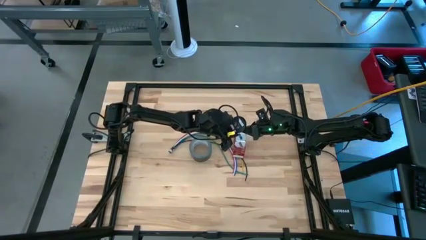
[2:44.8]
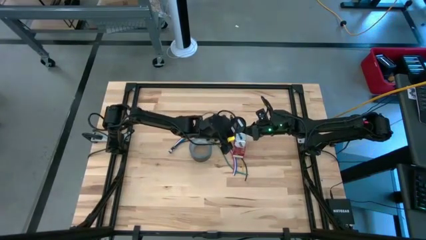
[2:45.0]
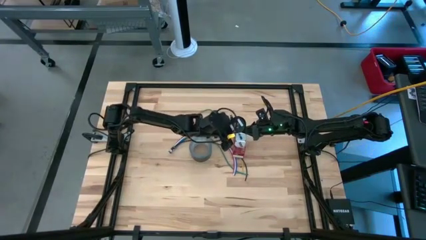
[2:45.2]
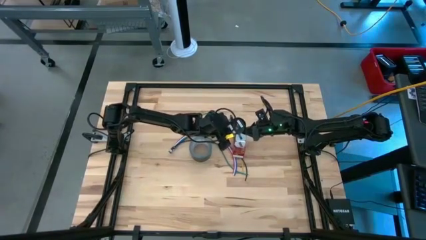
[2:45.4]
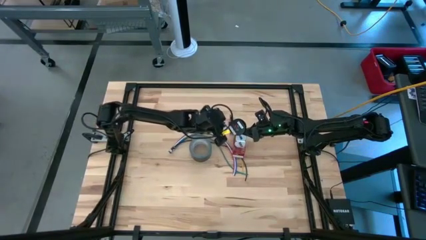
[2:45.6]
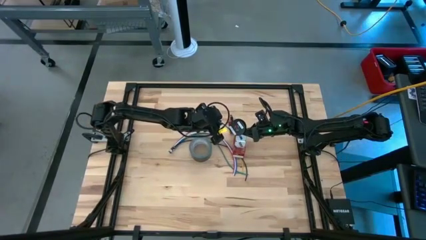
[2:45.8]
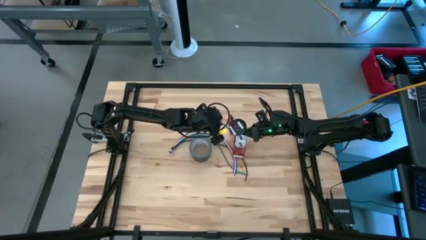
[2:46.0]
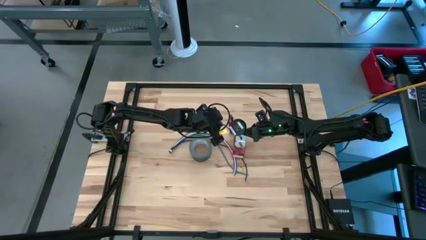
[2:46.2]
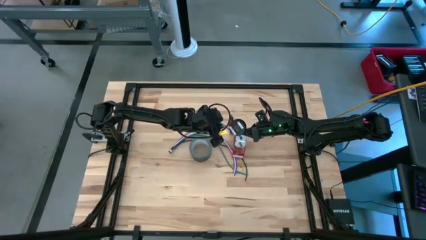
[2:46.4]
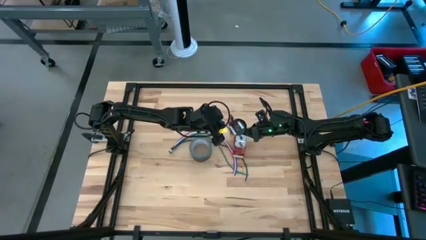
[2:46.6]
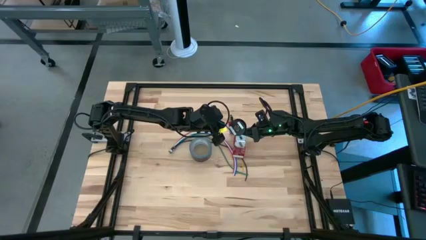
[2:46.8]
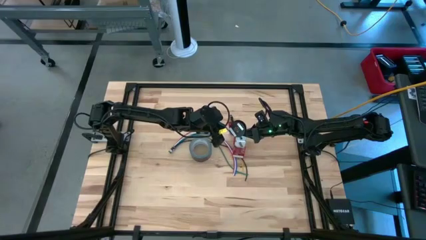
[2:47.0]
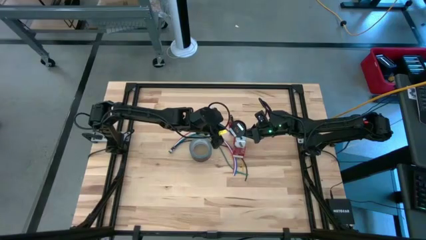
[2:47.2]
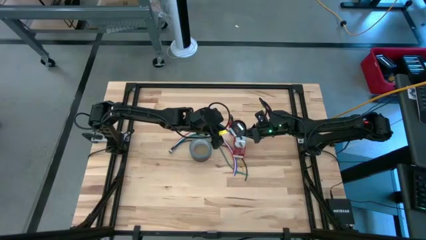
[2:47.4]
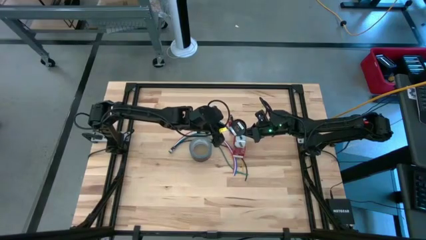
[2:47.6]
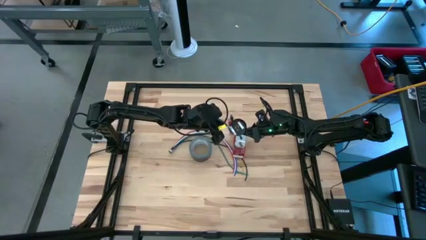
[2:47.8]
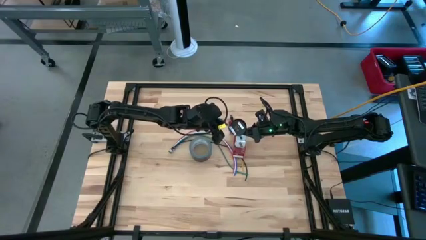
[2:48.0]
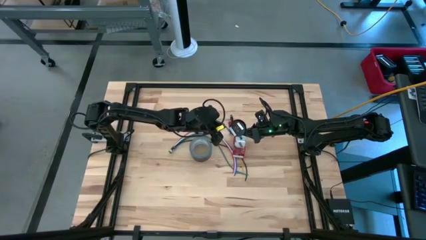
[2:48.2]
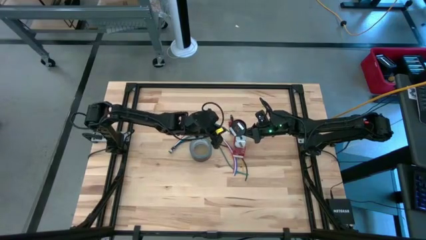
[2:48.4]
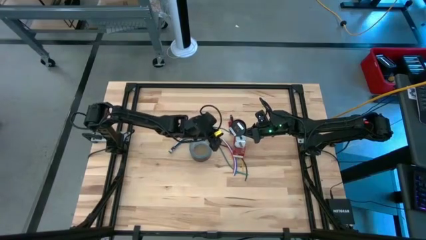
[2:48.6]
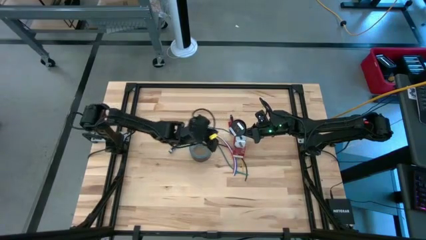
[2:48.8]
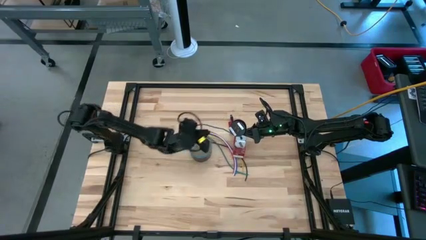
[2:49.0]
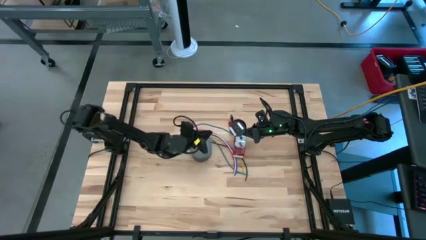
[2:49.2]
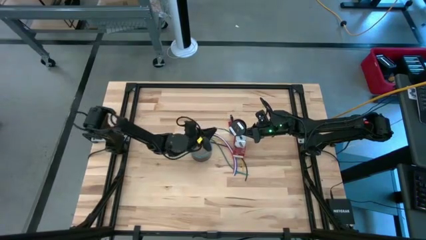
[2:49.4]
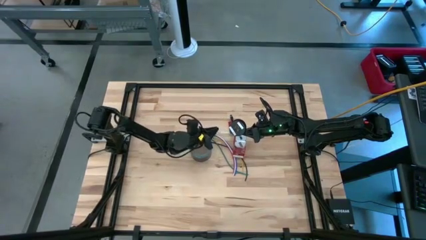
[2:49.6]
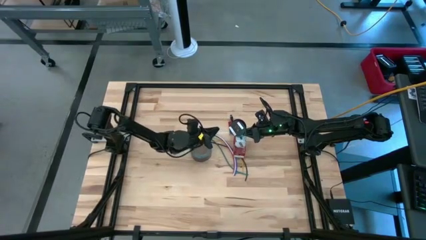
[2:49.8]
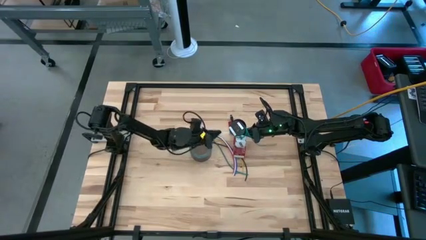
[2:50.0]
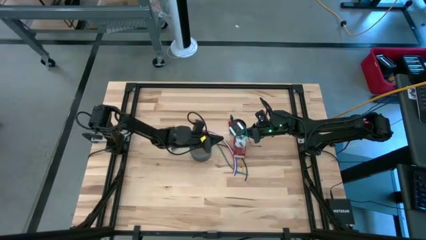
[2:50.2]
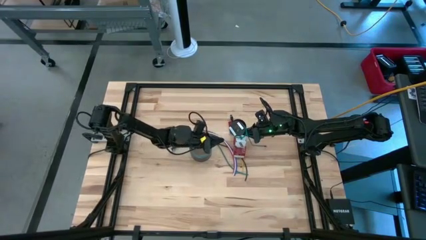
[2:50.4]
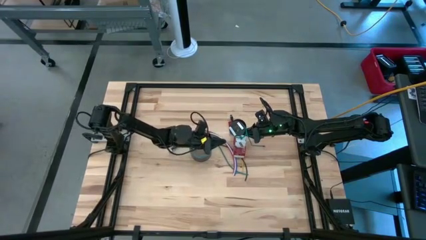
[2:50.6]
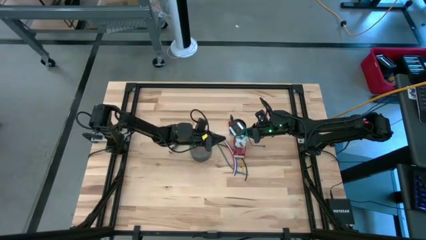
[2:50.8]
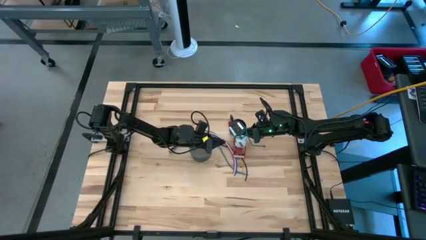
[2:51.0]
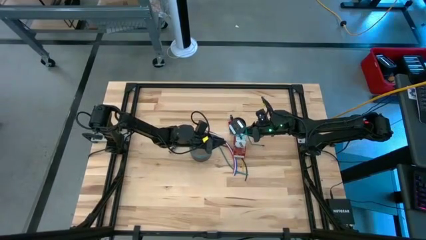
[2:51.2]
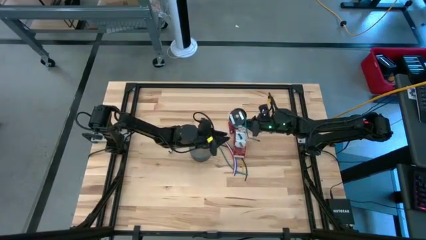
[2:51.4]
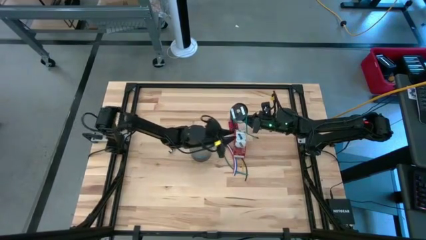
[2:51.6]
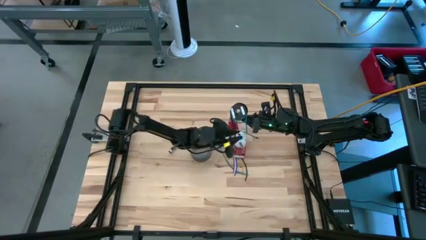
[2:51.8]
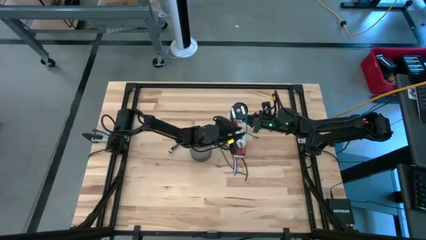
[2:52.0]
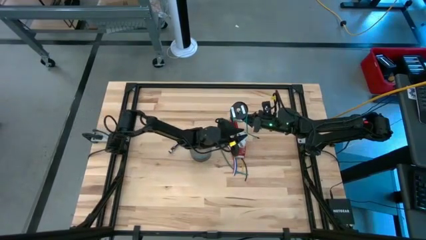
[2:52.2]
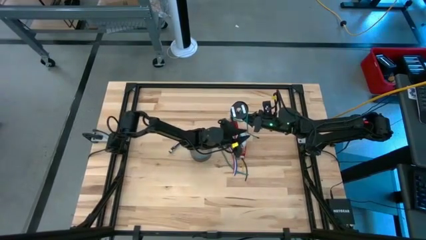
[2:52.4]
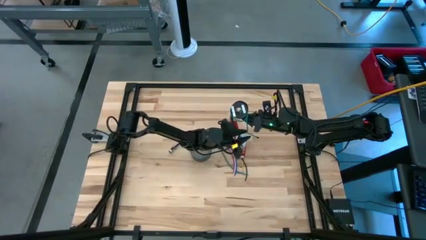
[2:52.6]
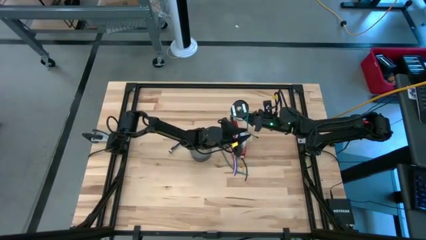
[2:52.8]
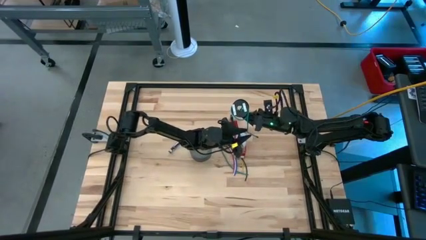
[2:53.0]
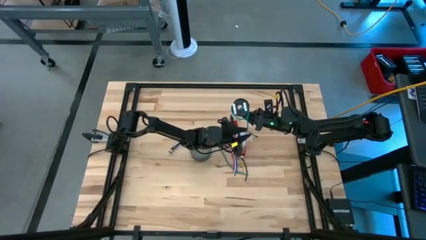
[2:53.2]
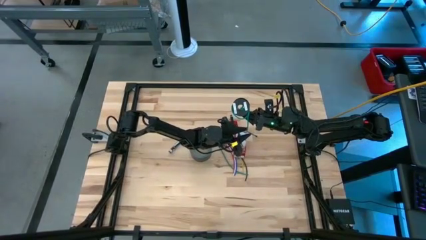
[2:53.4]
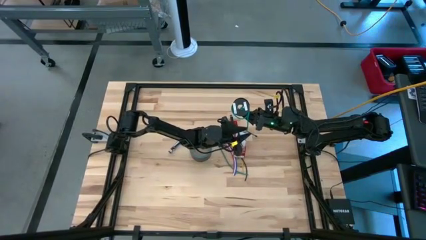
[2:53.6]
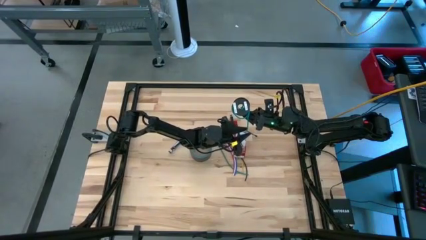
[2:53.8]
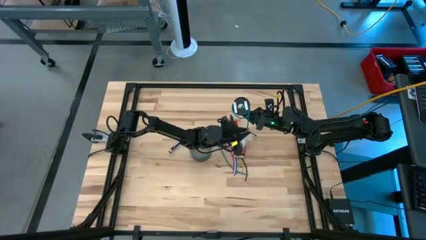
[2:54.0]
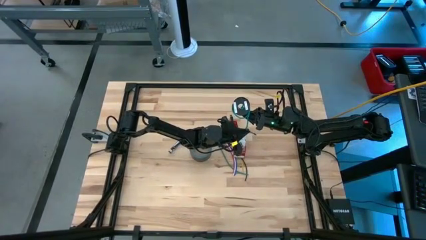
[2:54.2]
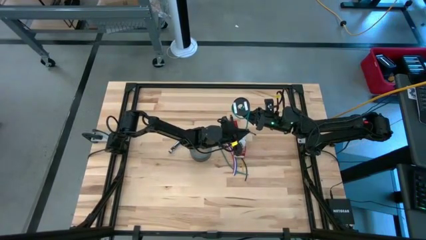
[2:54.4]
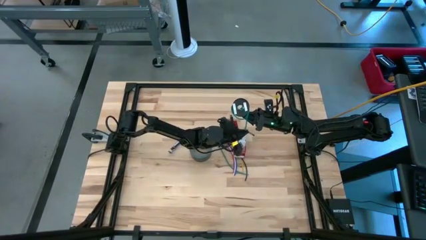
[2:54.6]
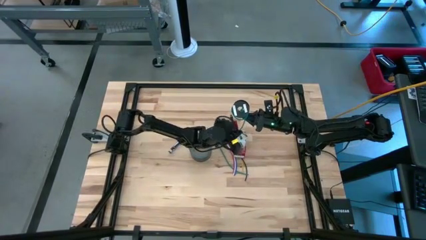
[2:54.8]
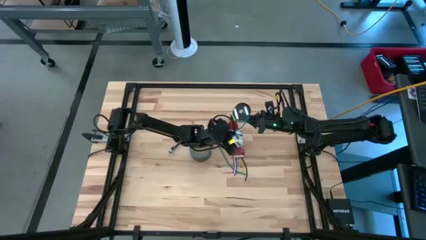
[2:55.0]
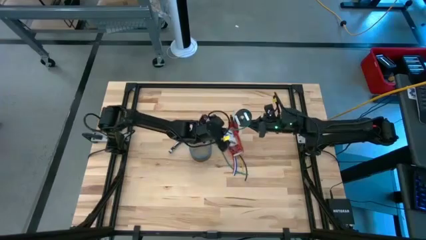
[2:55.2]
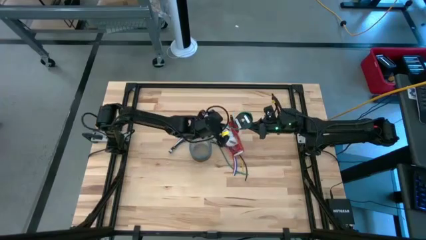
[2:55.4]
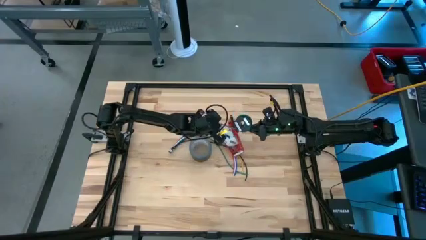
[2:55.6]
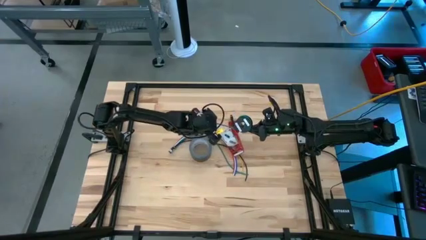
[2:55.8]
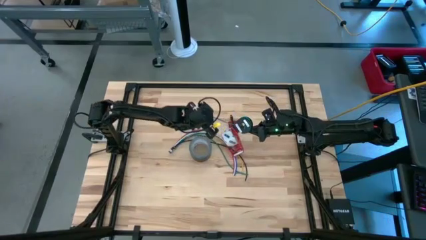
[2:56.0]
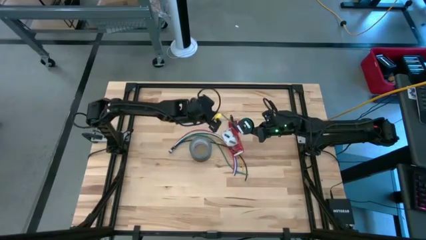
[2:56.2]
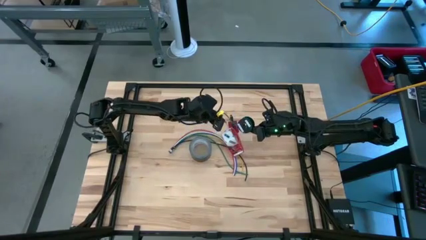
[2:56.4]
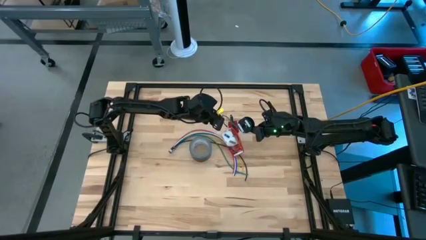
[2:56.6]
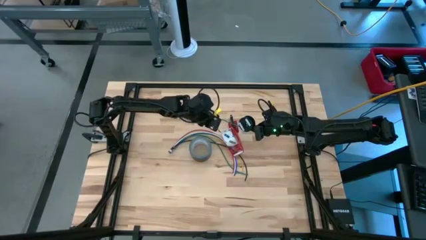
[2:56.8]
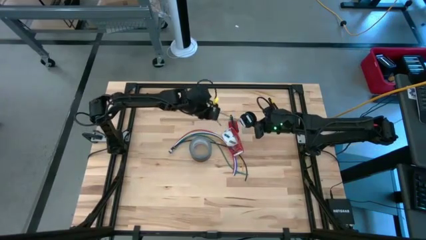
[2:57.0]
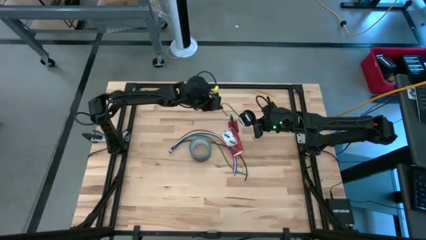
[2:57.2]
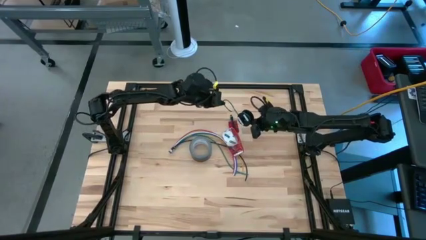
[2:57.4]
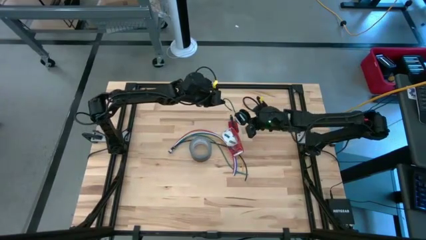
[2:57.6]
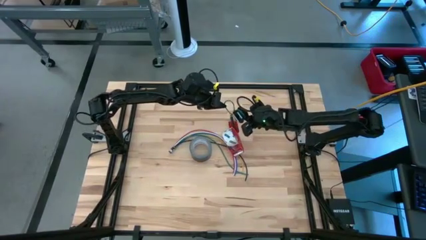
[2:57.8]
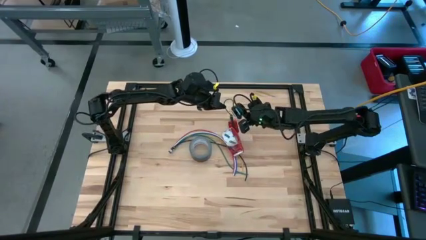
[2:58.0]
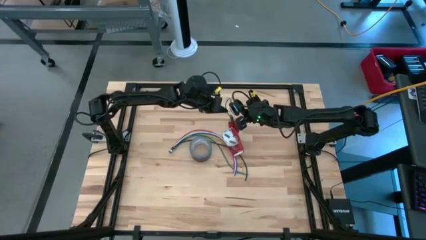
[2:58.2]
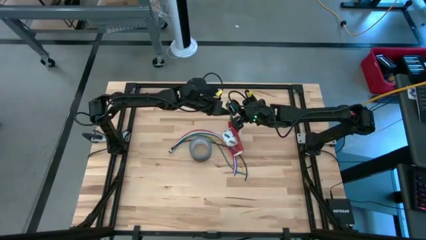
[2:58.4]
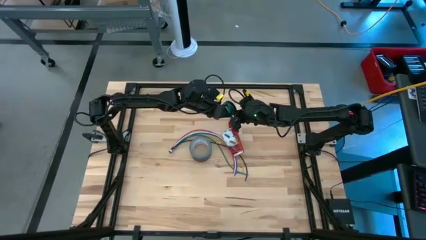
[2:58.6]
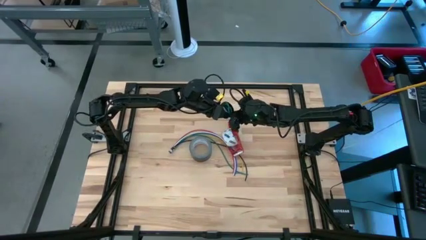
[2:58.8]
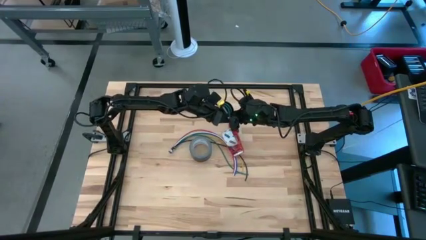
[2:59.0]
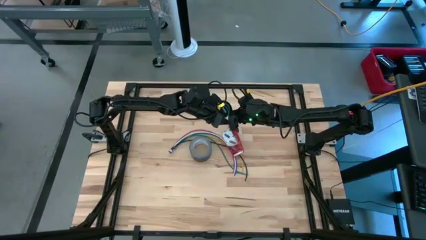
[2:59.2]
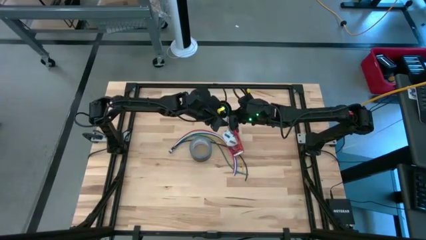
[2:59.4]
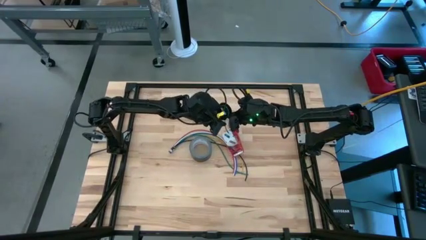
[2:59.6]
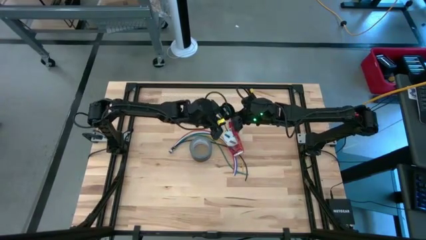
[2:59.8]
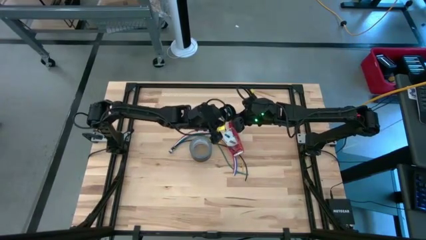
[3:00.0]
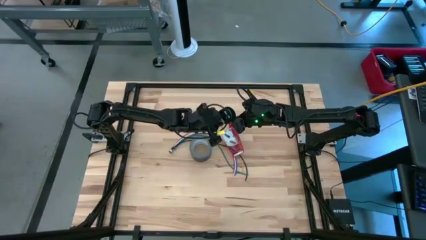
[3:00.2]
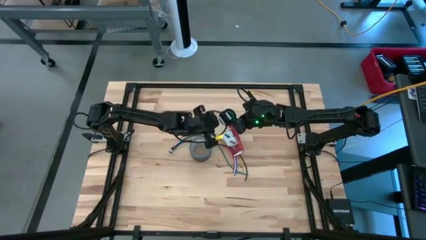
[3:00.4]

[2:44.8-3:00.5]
Task: Coil cords
Coil the green wire into the spool
